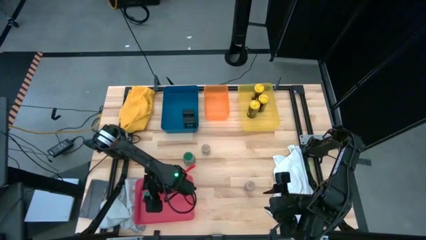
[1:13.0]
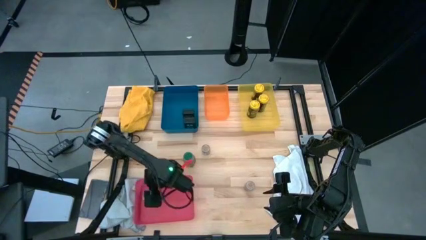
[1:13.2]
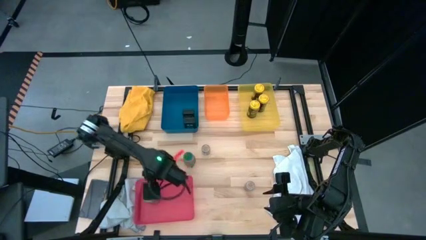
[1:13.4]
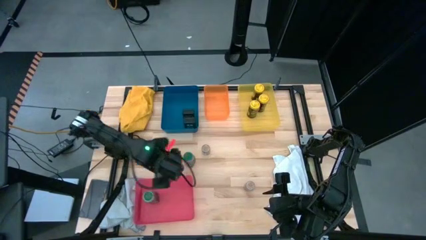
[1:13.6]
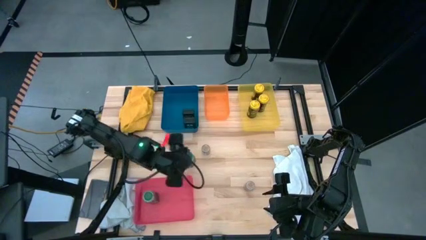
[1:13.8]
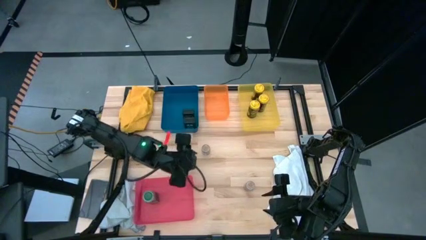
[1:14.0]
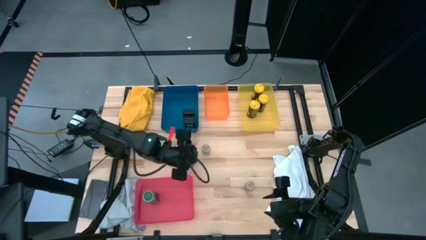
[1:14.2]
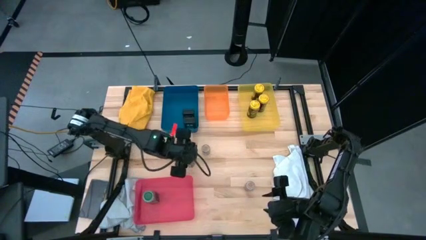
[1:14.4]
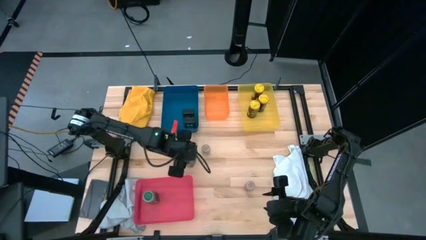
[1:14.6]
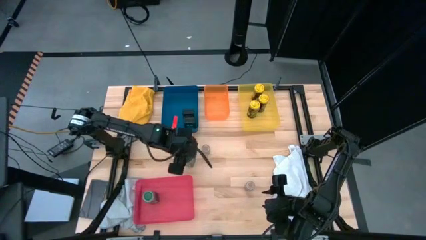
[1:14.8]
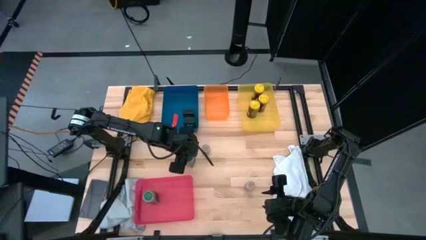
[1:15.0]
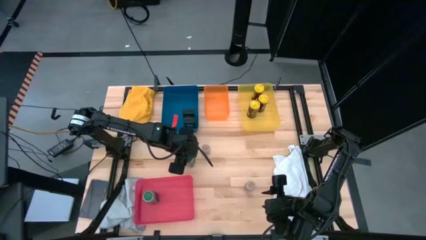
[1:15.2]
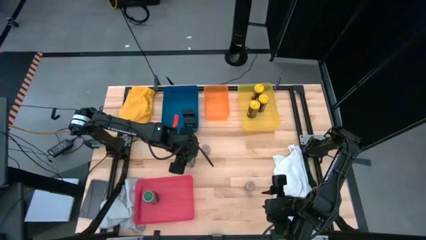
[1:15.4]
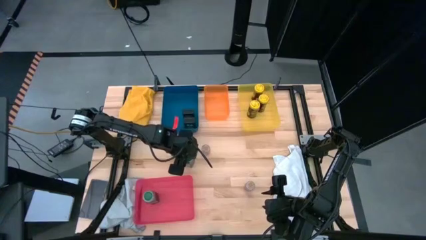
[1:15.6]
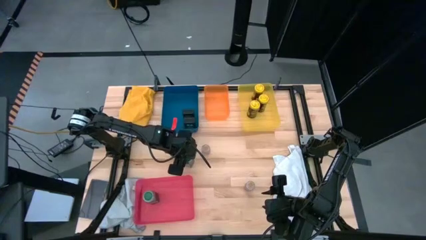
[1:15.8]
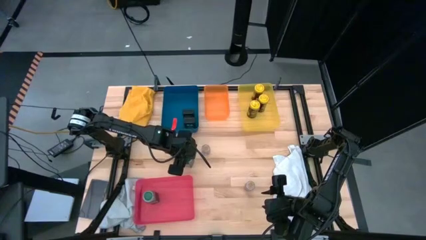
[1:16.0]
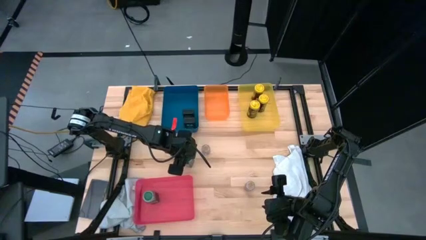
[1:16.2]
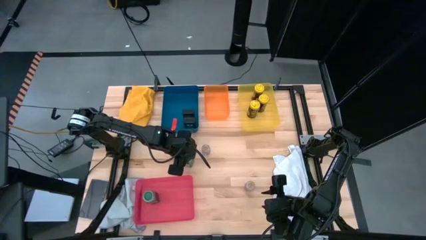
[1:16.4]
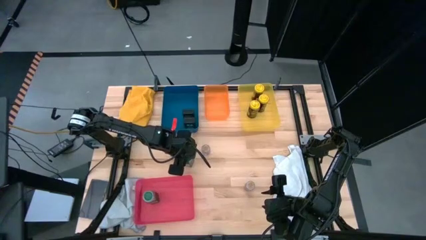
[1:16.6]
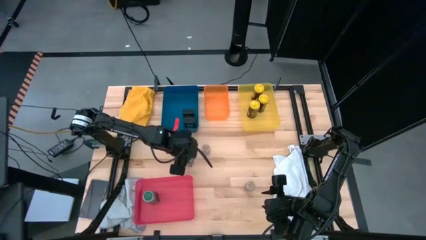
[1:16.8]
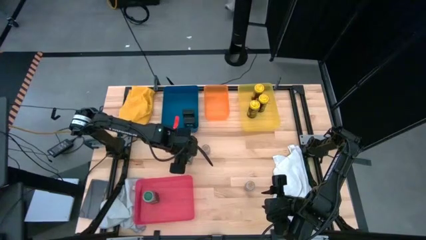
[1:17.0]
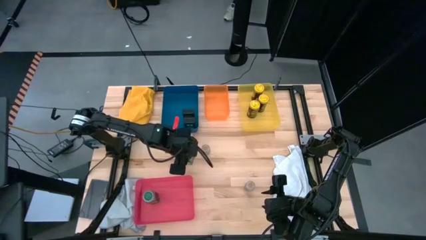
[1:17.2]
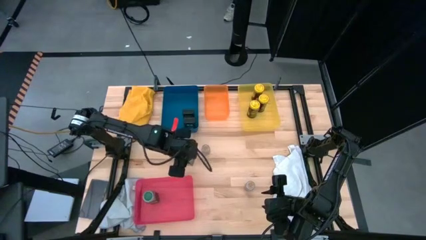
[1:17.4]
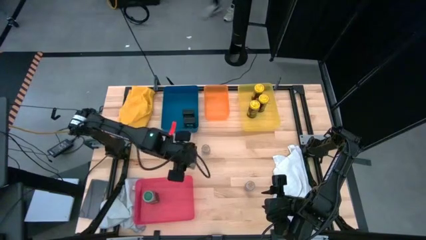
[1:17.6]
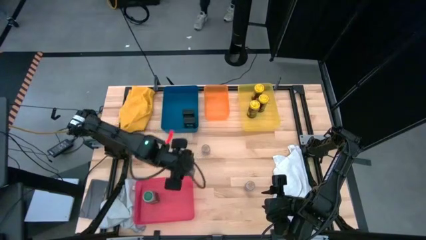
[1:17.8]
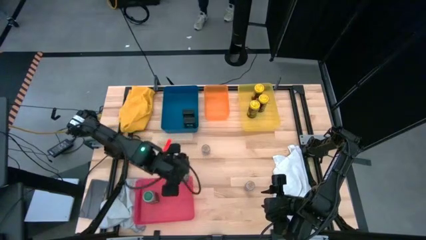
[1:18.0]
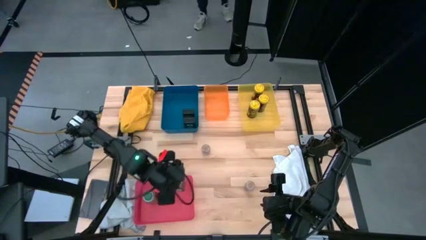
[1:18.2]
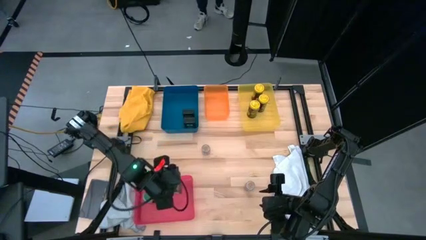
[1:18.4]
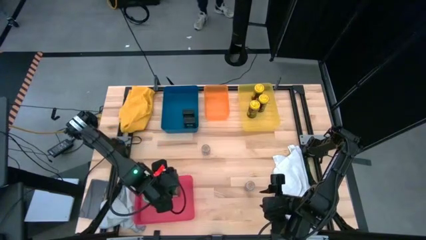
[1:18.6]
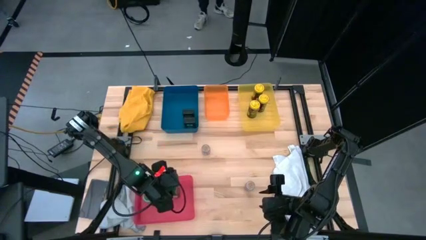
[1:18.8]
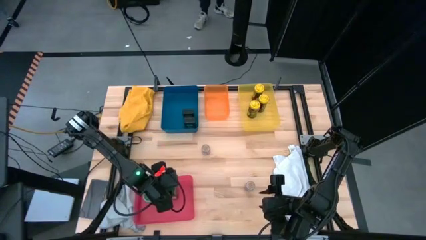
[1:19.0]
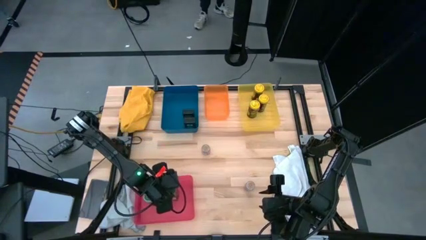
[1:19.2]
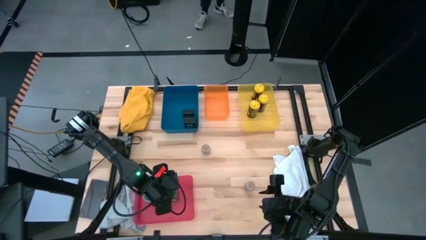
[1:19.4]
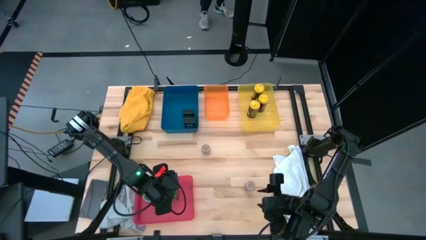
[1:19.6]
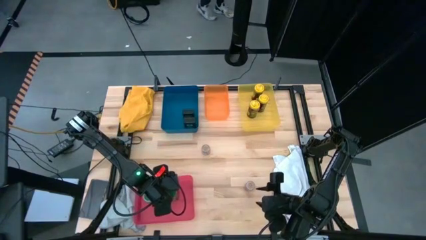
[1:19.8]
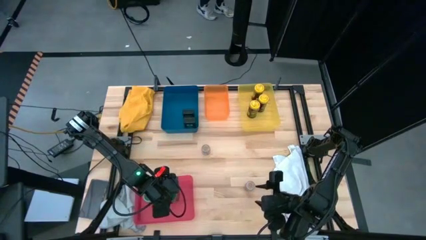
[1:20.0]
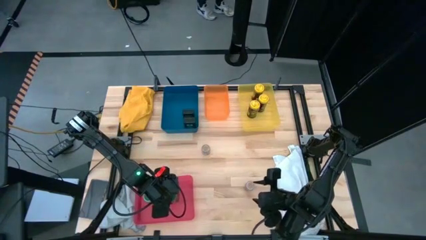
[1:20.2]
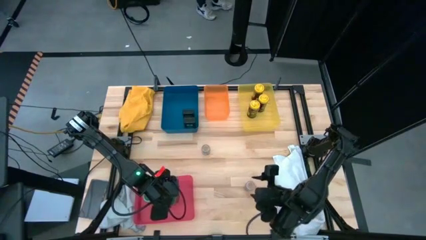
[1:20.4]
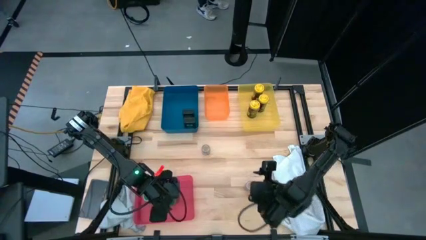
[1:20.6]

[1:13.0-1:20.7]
Task: Sort spices by type
Put the green seasoning bottle into the red bin

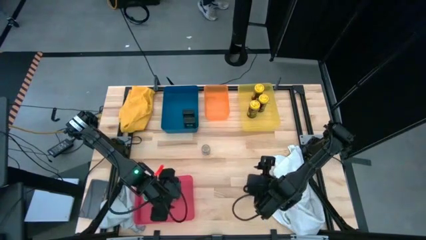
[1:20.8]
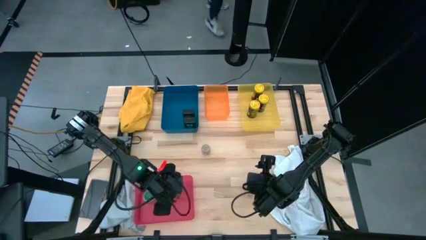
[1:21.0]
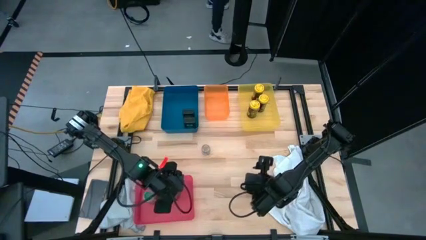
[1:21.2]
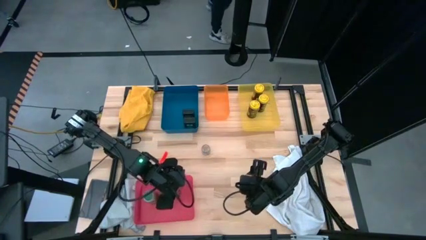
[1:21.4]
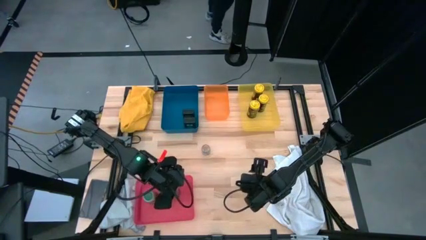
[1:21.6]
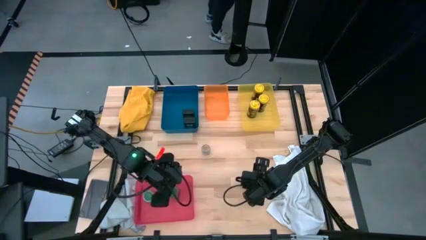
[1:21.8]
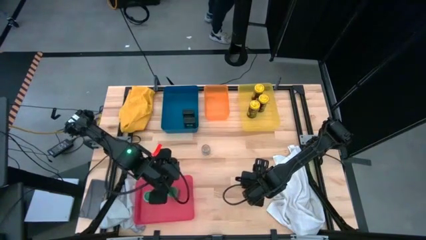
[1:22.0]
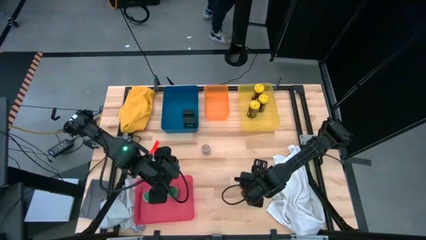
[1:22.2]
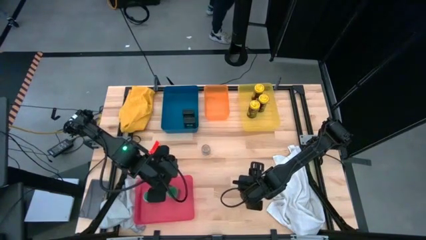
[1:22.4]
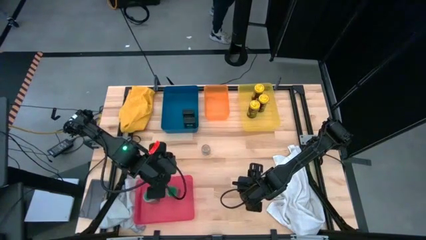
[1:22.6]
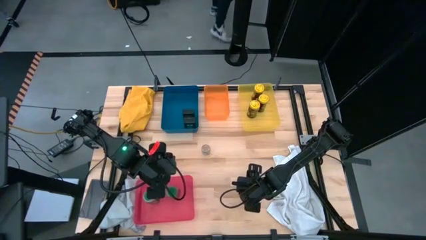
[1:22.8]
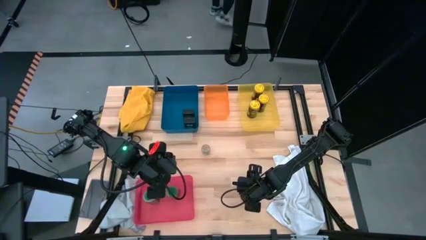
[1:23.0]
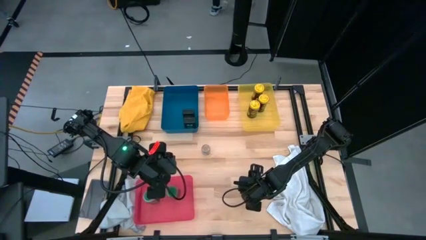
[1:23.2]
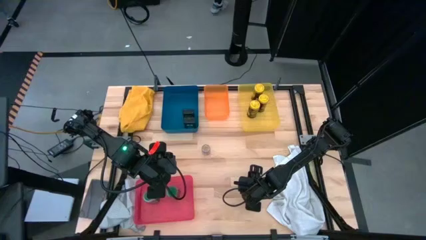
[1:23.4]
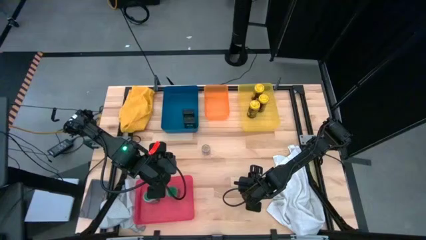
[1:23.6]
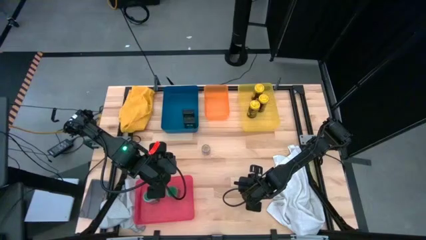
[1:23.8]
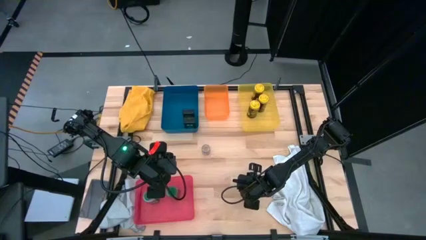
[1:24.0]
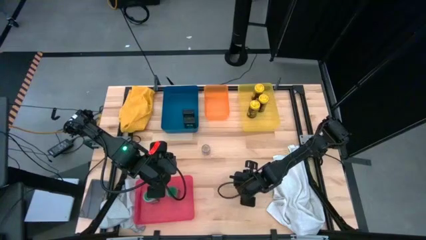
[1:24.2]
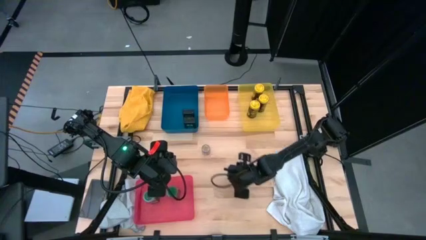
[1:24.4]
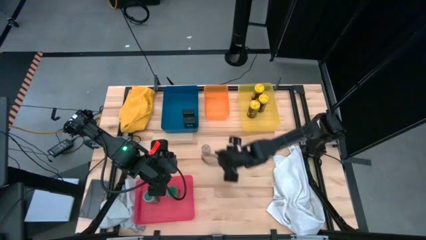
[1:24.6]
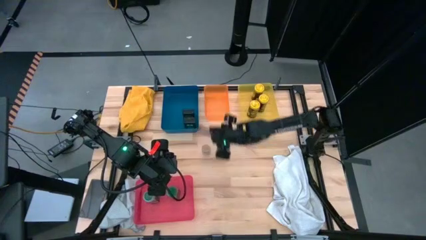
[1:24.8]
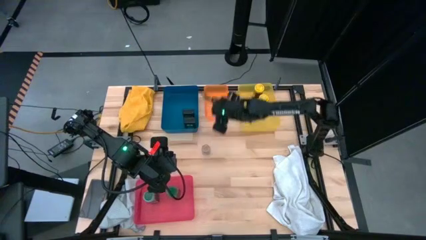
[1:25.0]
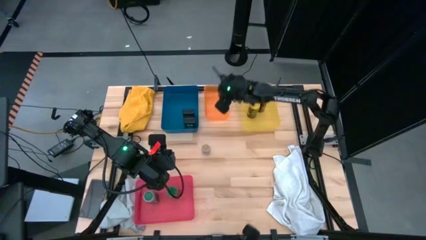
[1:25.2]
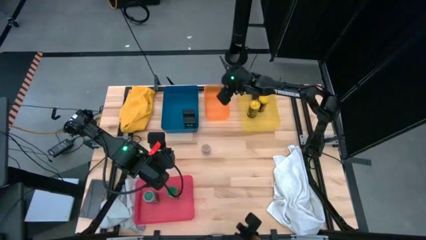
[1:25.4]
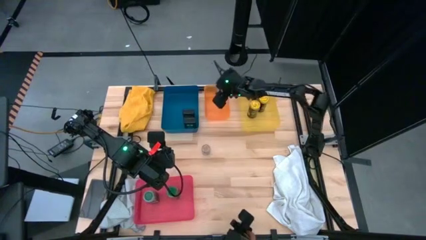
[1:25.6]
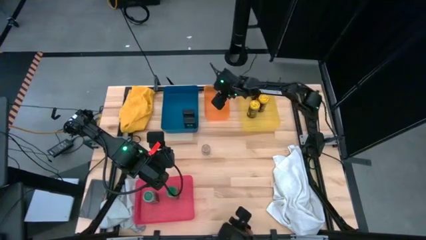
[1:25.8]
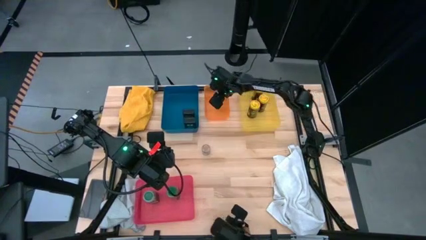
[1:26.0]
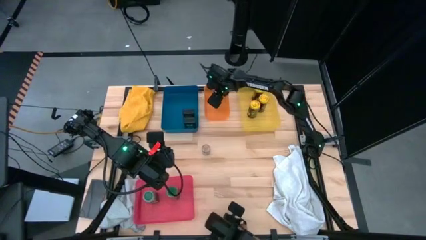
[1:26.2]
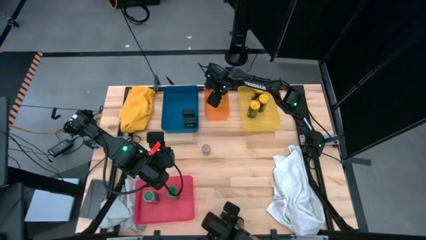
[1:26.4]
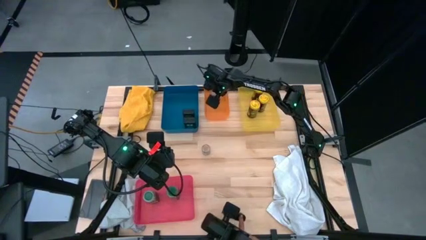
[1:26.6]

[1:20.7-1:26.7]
Put the bottom brown seasoning bottle into the orange bin

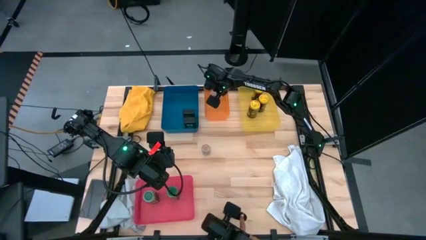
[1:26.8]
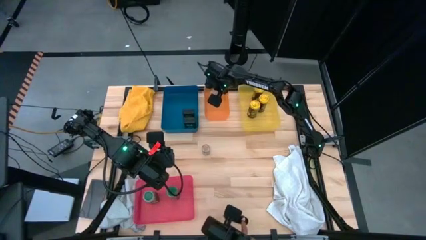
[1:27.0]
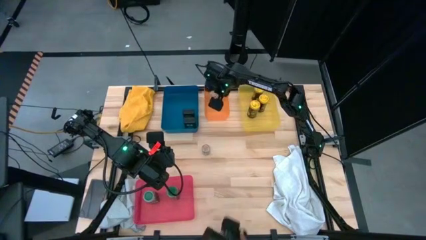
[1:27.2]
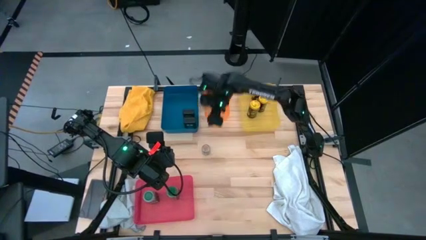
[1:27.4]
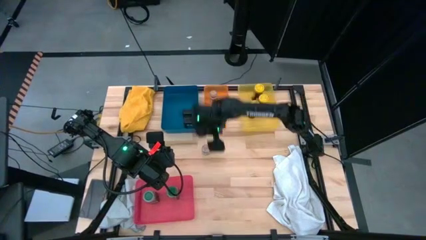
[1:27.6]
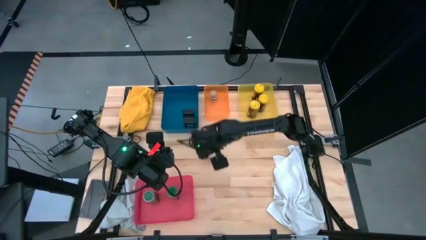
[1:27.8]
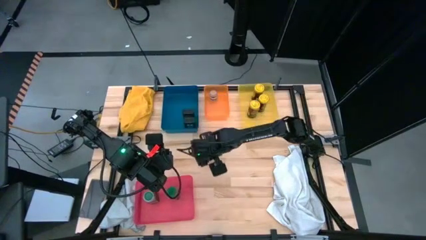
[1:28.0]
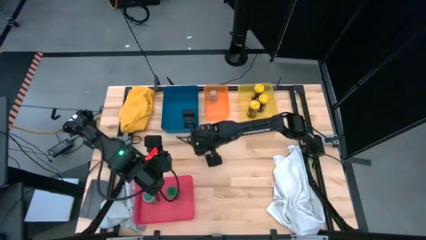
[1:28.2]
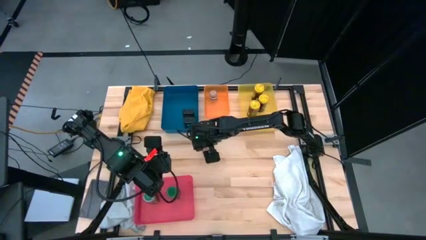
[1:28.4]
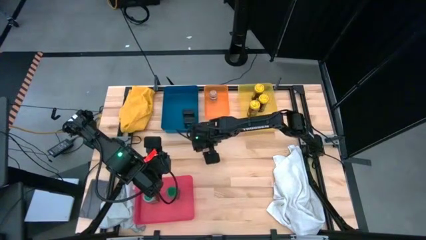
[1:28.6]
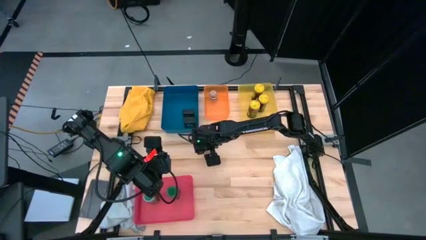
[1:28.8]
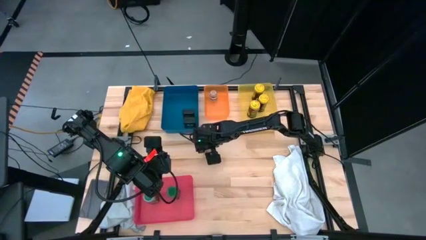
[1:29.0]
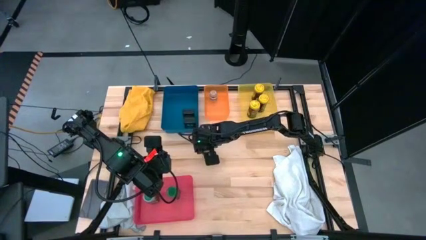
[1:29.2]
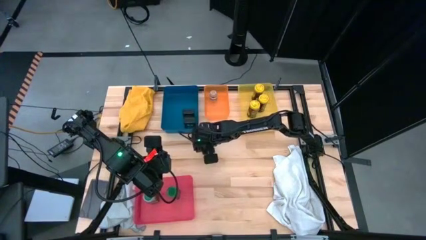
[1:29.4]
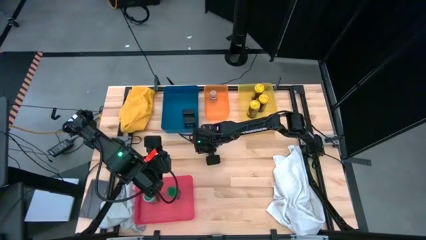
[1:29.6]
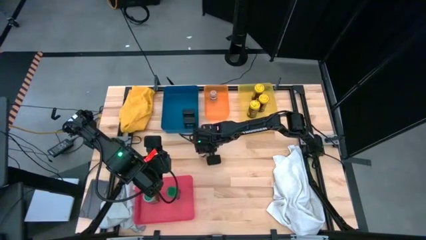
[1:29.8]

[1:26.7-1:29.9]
Put the brown seasoning bottle into the orange bin
